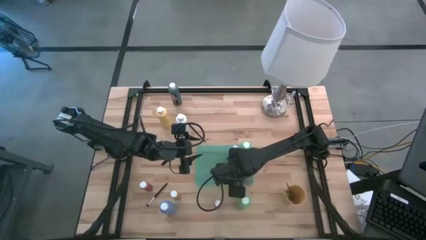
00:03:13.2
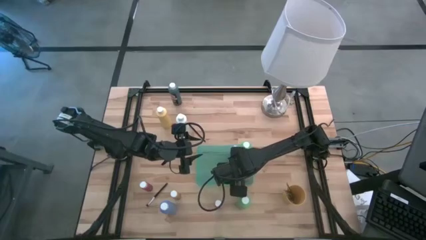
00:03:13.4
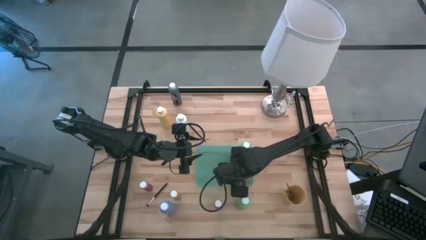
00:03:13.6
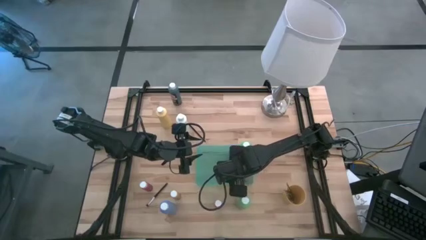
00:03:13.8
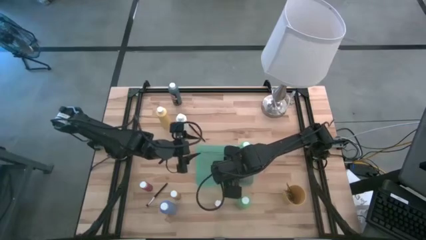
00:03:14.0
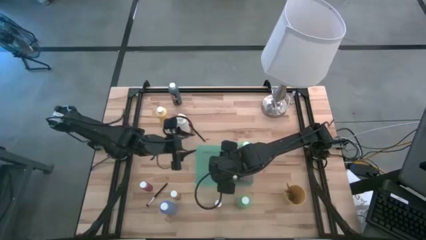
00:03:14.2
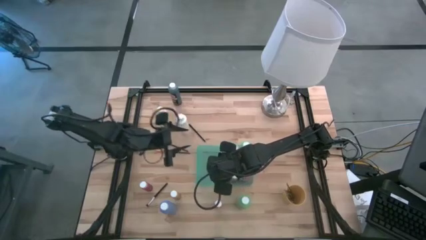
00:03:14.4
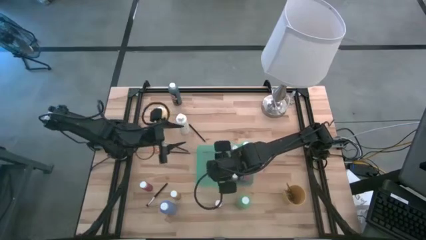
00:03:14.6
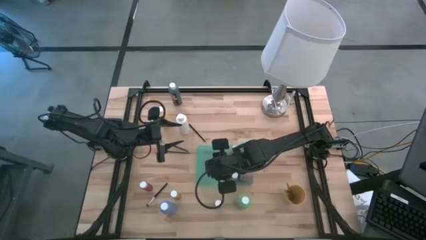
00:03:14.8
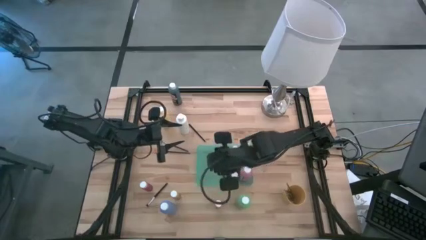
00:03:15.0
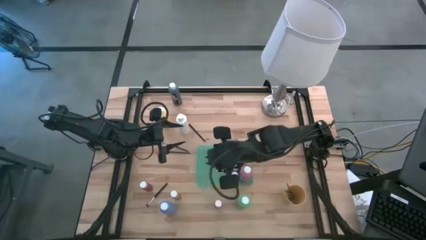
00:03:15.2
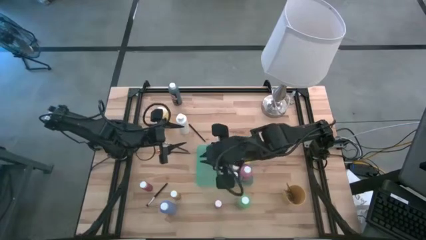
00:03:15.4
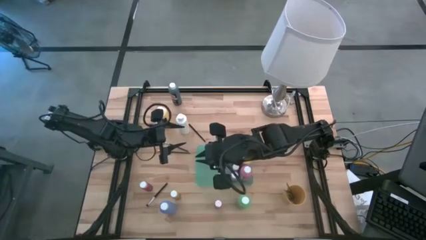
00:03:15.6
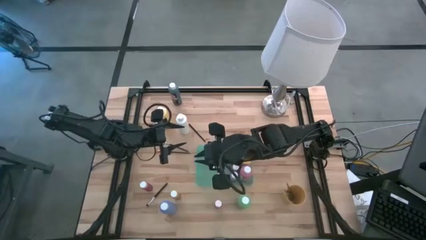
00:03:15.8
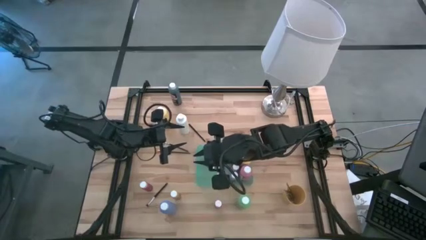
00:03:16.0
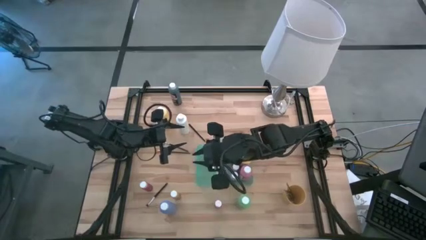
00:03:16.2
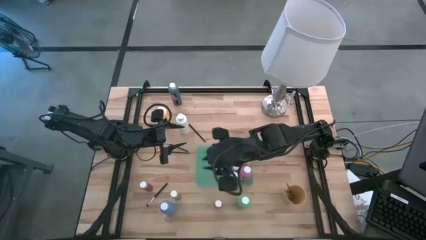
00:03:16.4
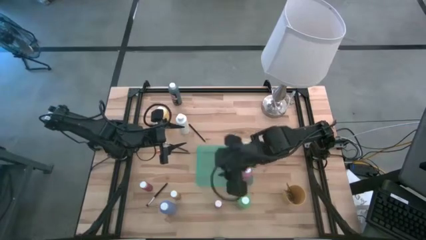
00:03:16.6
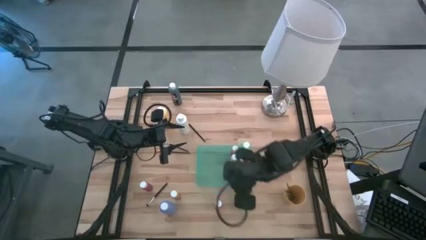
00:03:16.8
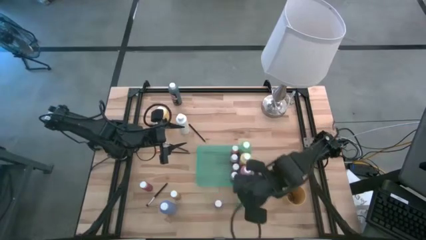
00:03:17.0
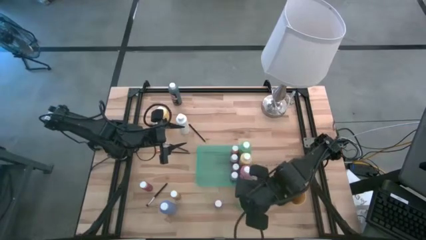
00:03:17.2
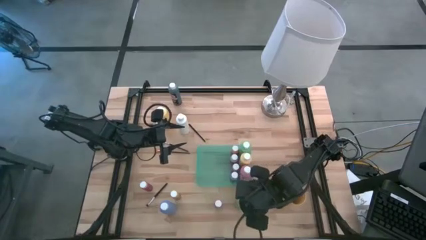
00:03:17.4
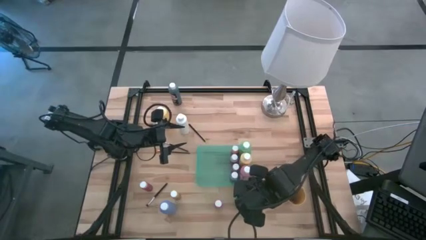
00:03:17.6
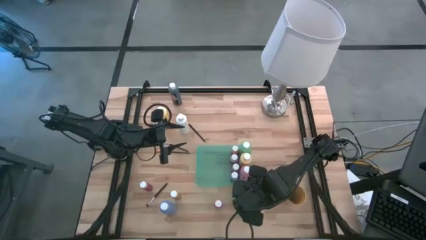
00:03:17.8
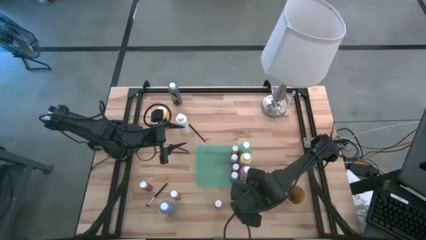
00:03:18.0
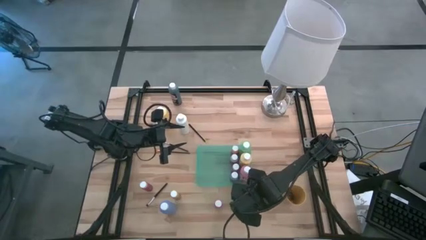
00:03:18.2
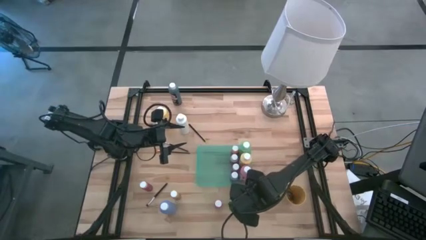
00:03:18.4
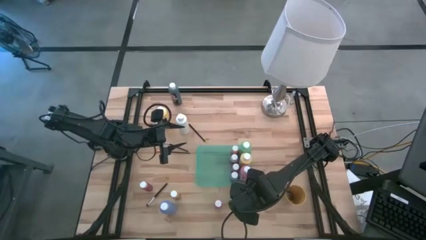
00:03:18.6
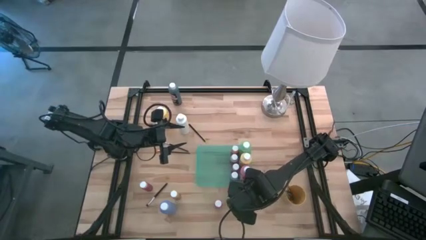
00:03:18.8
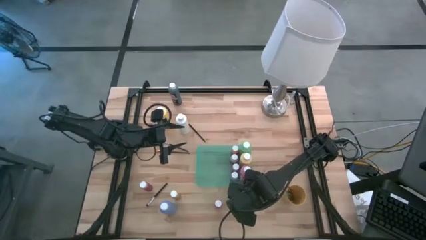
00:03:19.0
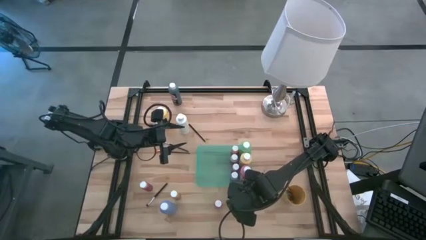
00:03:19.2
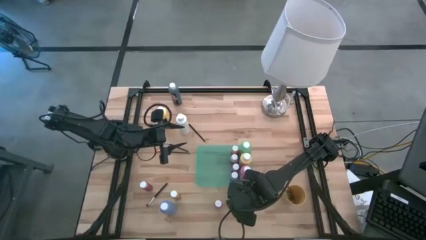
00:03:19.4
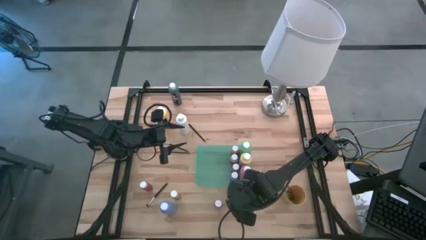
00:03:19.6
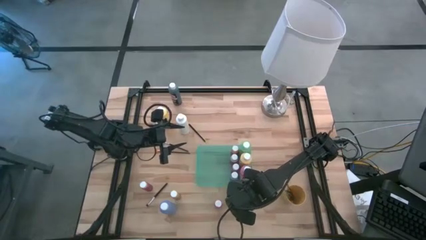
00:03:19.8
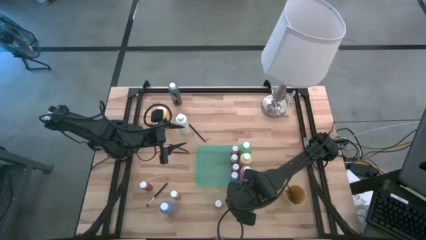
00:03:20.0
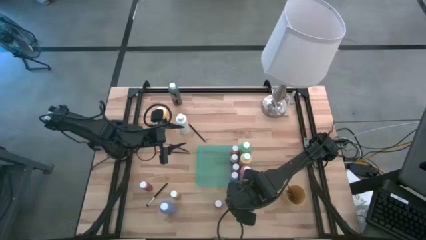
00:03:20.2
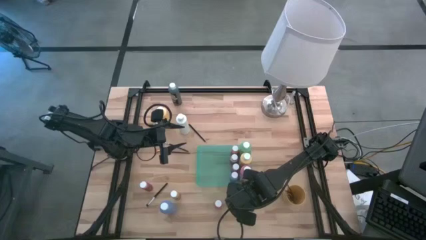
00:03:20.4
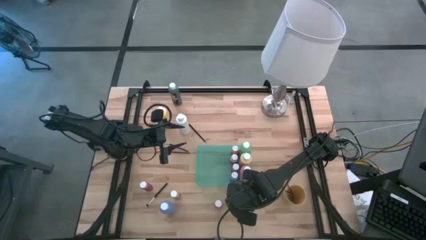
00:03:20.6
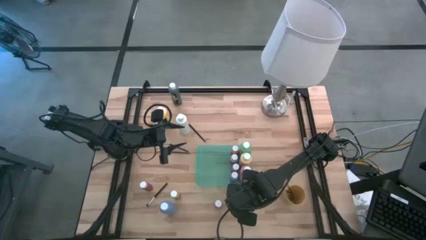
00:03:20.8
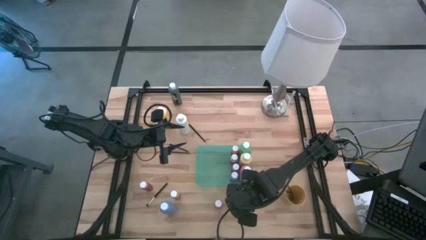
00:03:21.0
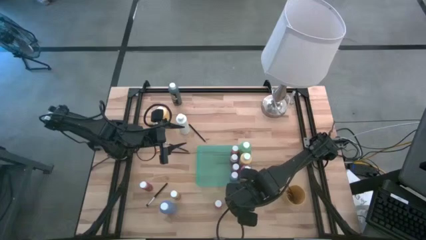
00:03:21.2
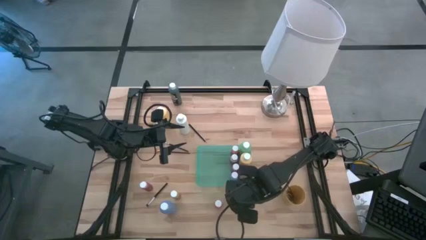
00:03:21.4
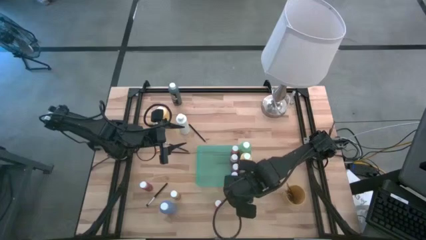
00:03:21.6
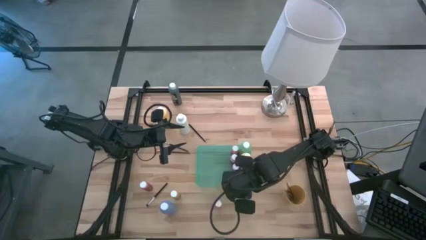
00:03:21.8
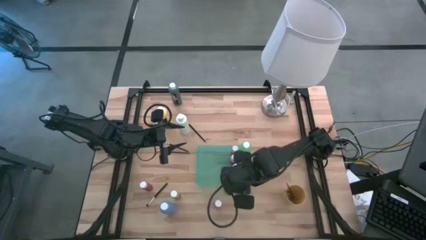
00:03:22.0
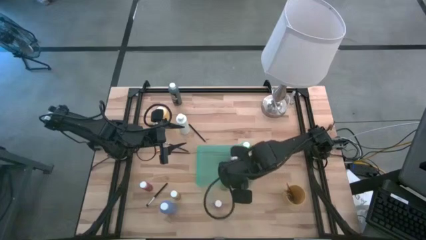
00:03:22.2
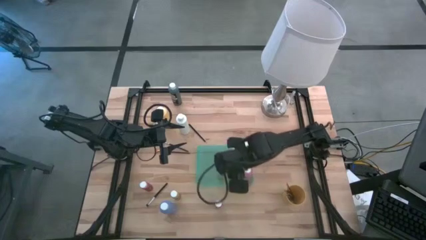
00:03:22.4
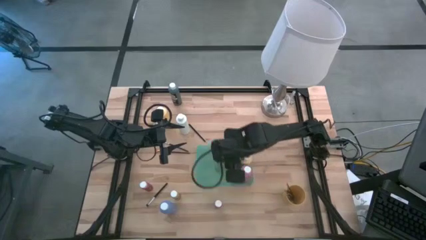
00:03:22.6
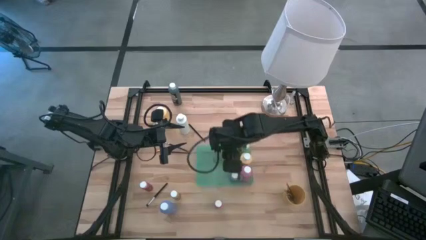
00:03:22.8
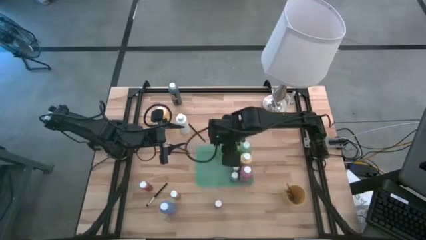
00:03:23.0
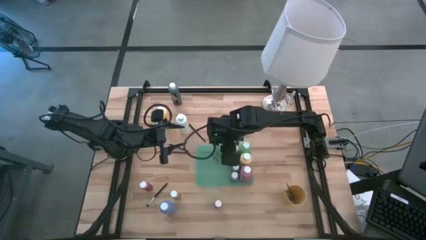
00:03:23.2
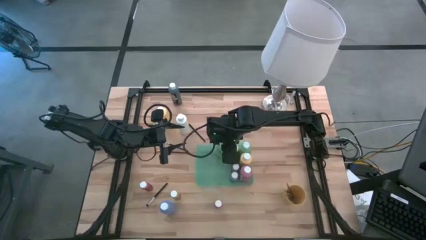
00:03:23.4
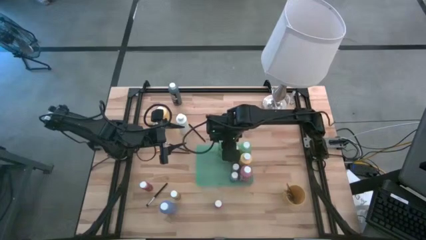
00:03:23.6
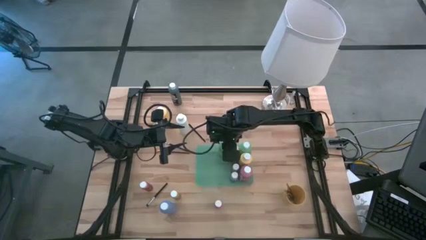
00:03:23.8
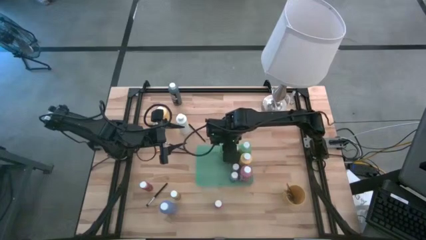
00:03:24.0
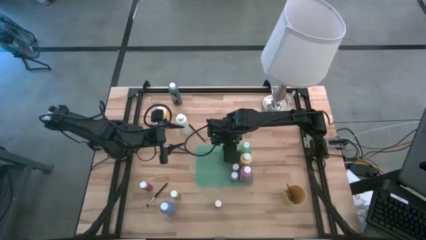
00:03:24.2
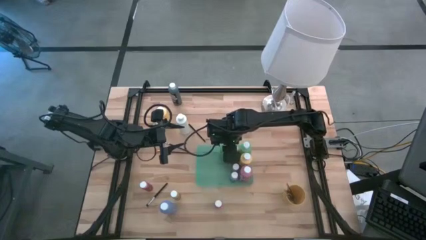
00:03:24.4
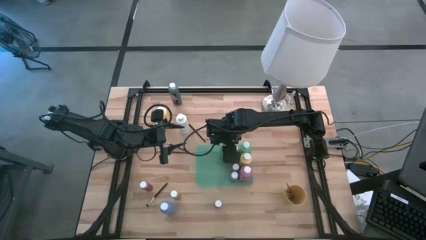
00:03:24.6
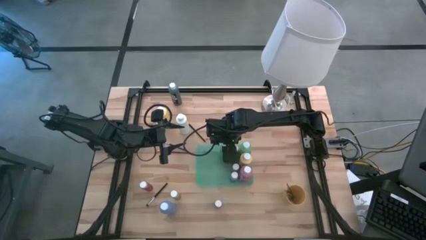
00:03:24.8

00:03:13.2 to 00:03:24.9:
Task: Pick & Place Paint Supplies
Put the green paint bottle into the green bin

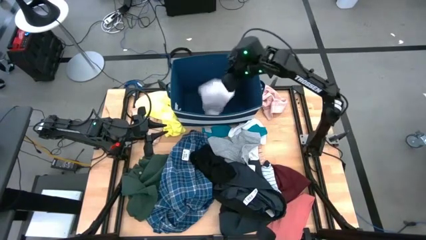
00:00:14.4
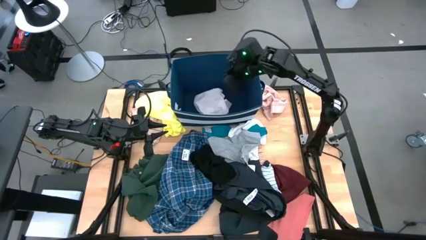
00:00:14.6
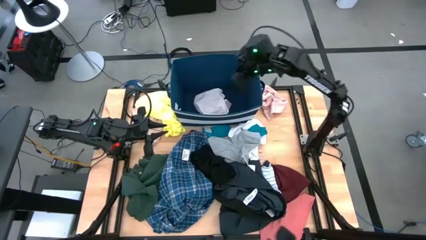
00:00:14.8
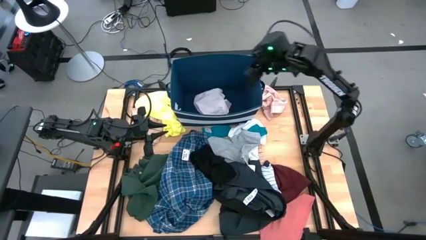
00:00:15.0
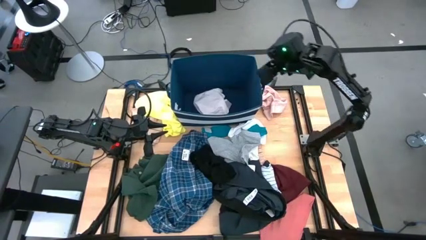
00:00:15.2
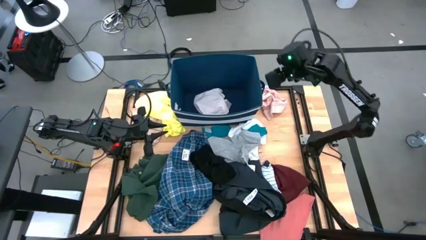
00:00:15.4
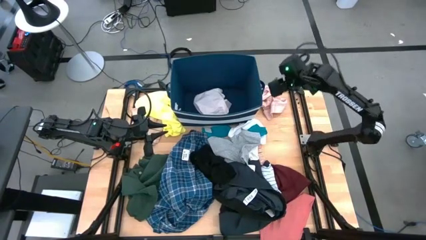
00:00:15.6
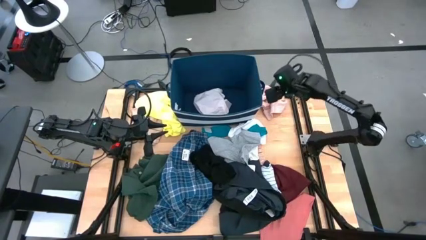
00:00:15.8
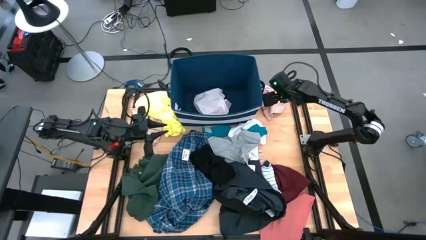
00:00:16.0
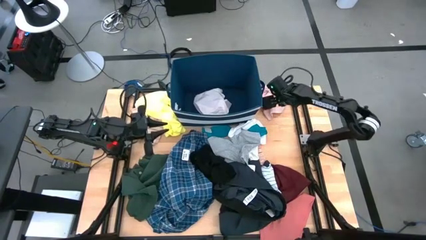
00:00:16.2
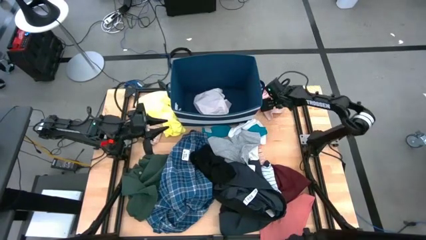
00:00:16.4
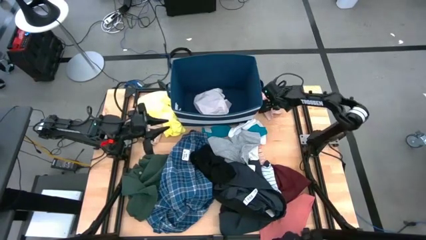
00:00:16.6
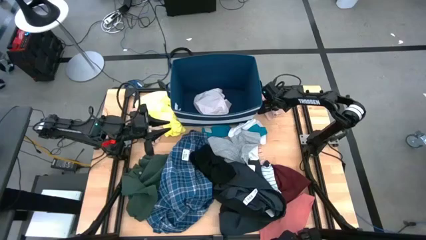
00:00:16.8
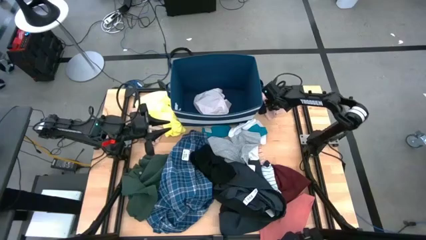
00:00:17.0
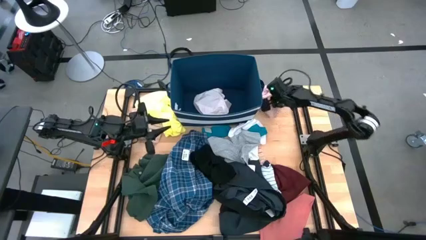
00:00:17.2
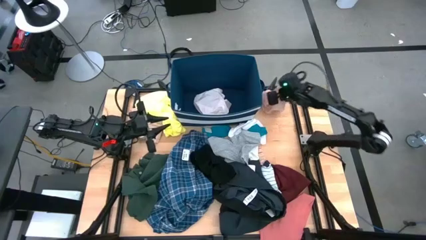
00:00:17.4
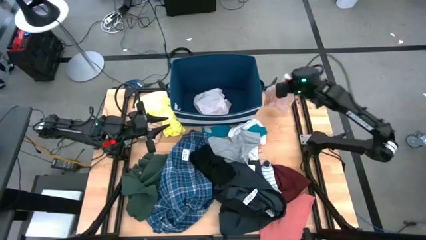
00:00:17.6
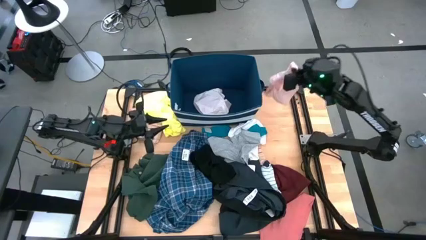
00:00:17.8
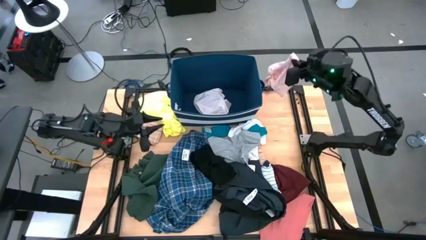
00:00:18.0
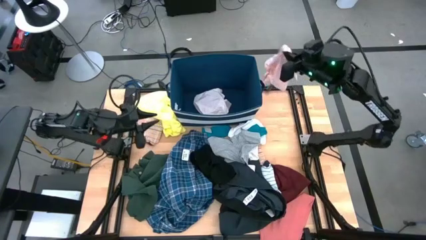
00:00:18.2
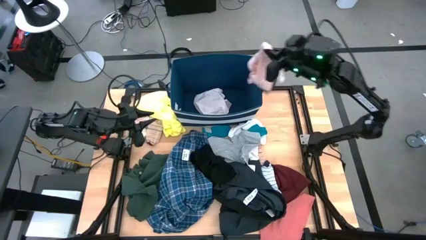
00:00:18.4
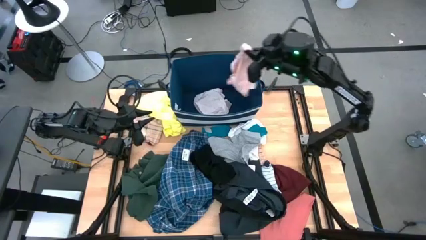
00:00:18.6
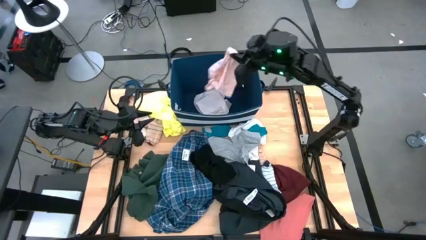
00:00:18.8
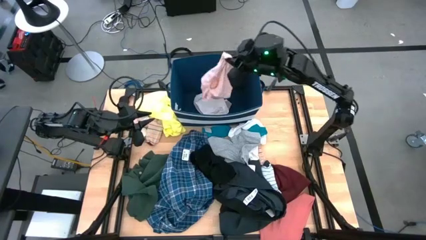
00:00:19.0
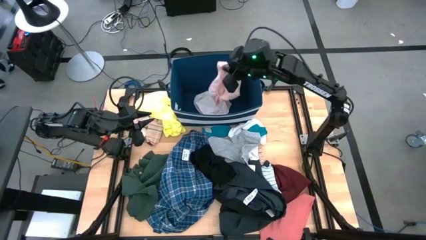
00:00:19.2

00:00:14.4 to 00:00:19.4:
Task: Sort clothes
Put the pink underwear into the laundry organizer
